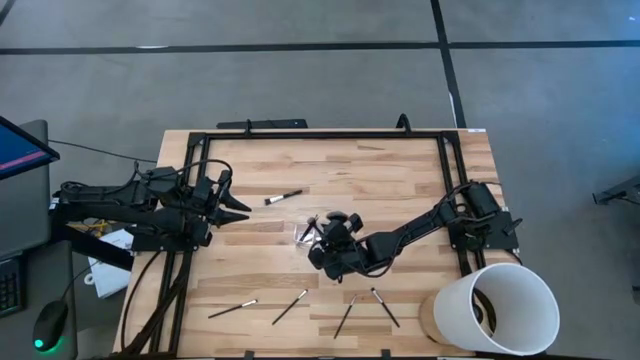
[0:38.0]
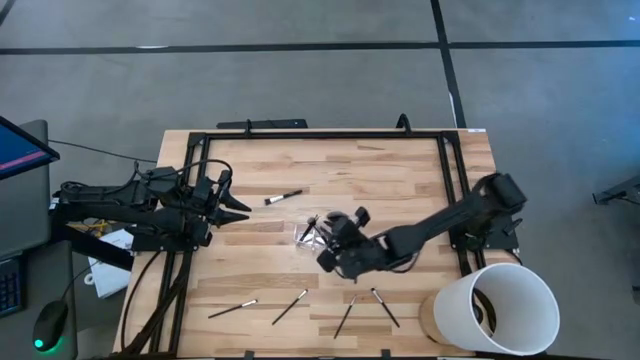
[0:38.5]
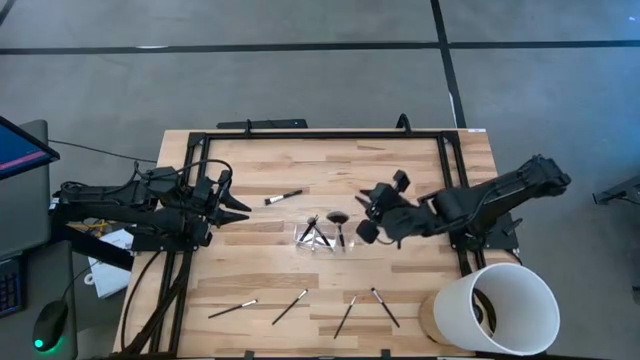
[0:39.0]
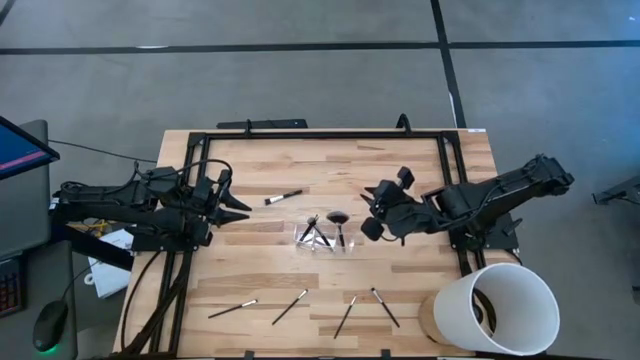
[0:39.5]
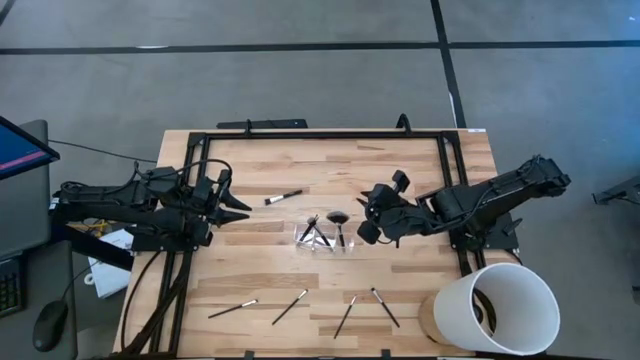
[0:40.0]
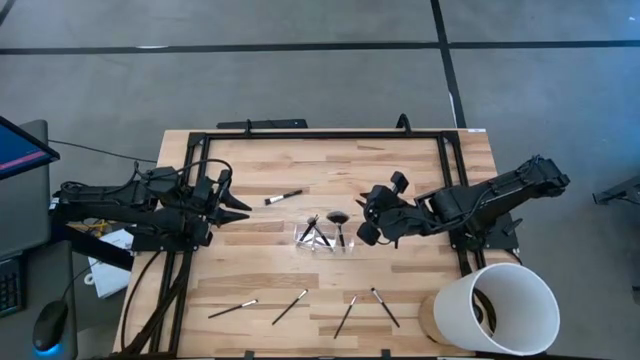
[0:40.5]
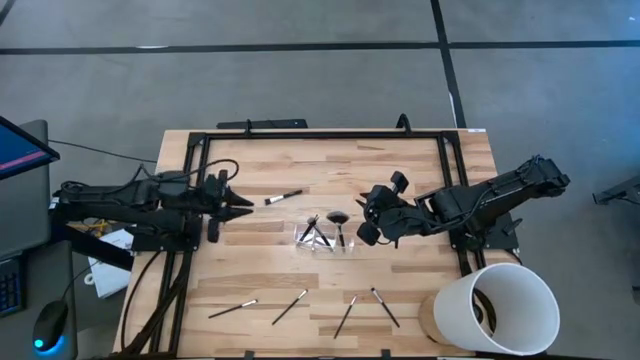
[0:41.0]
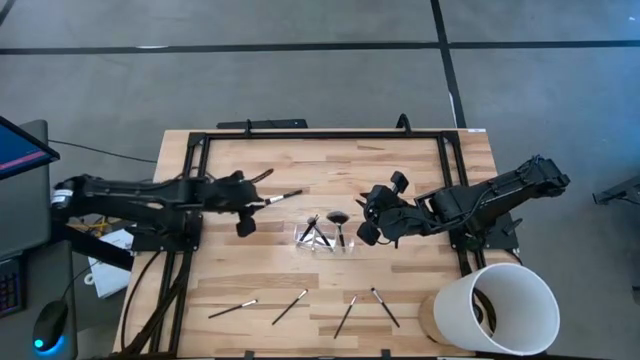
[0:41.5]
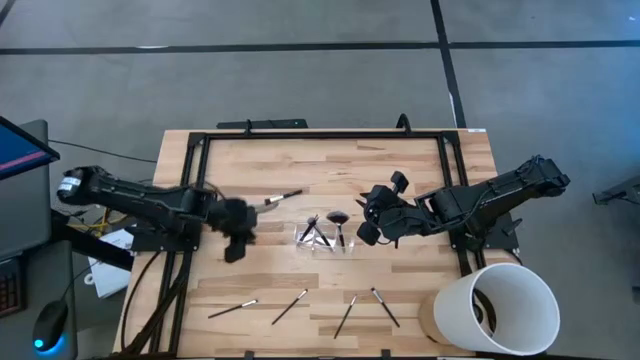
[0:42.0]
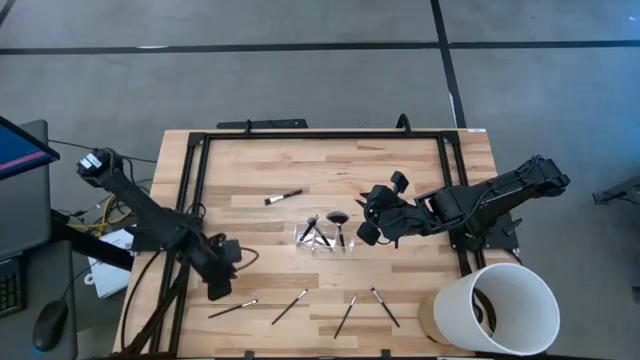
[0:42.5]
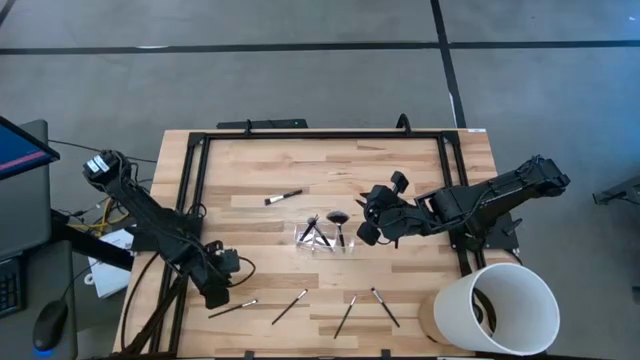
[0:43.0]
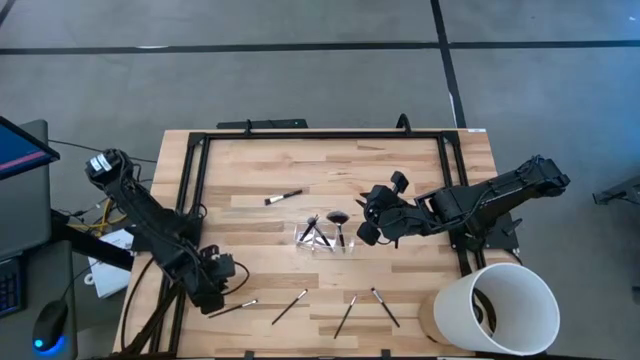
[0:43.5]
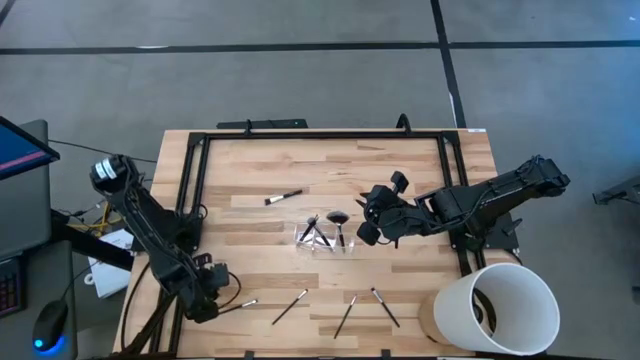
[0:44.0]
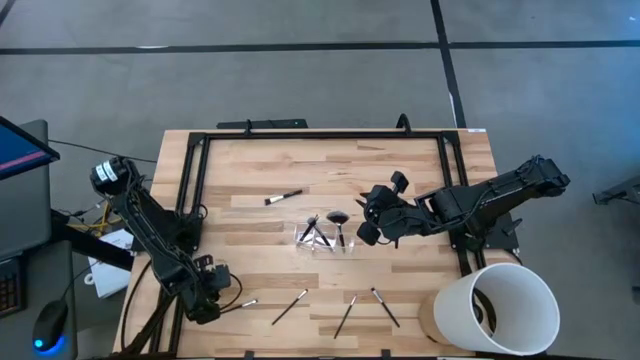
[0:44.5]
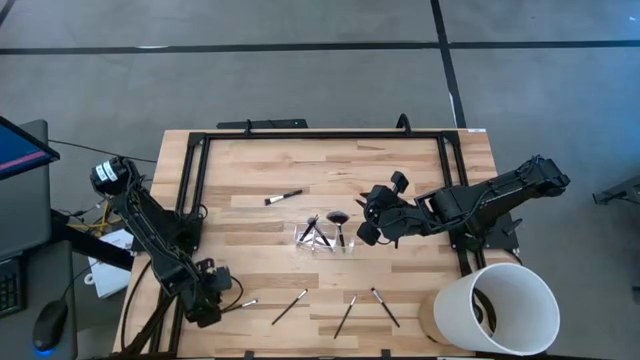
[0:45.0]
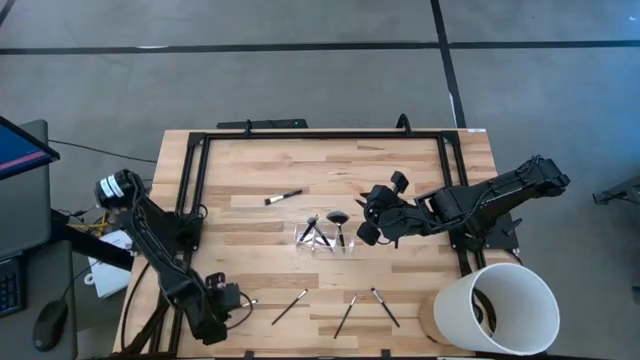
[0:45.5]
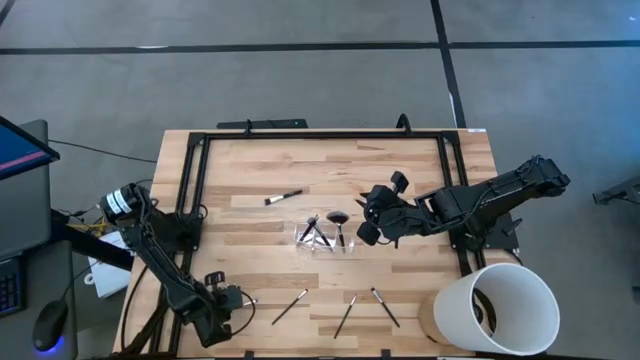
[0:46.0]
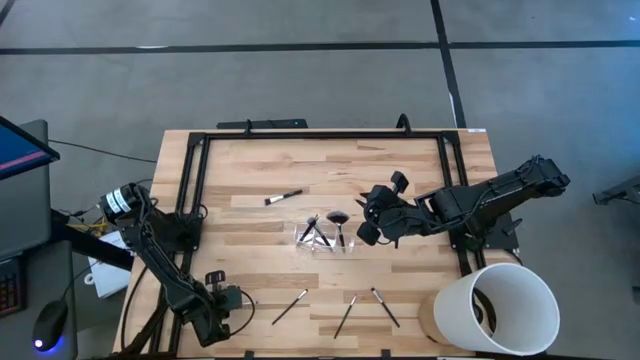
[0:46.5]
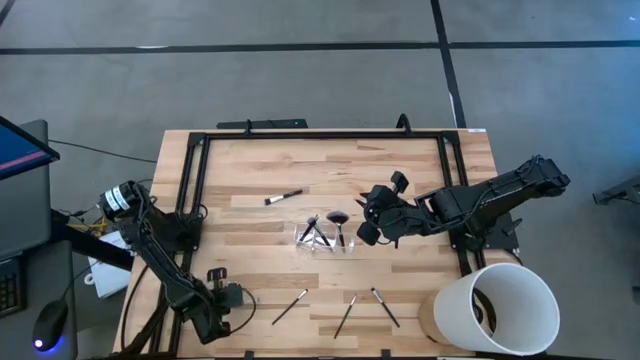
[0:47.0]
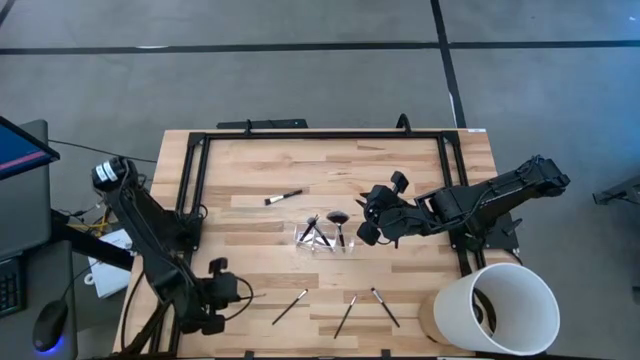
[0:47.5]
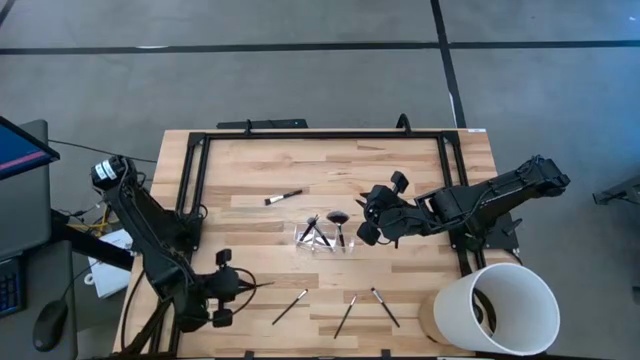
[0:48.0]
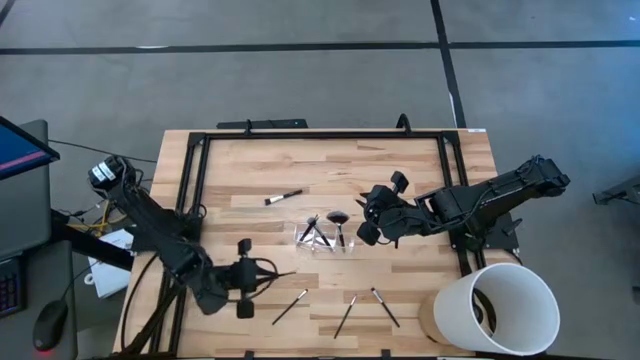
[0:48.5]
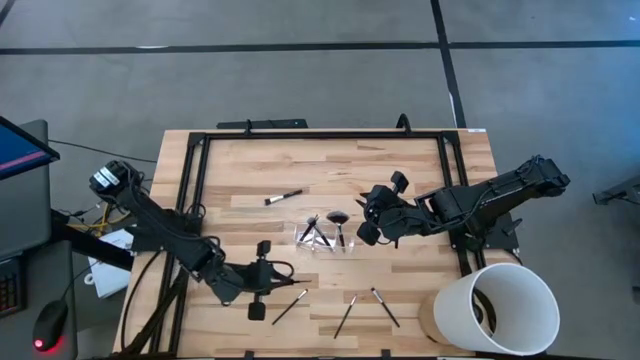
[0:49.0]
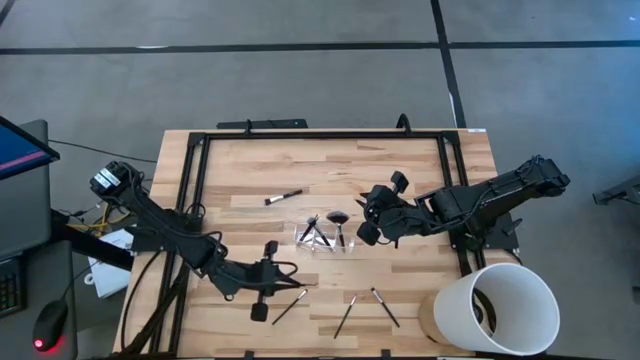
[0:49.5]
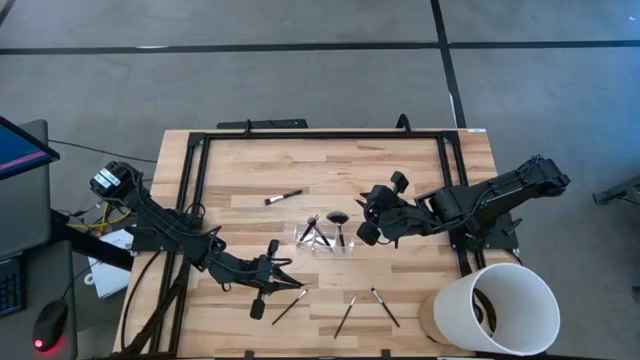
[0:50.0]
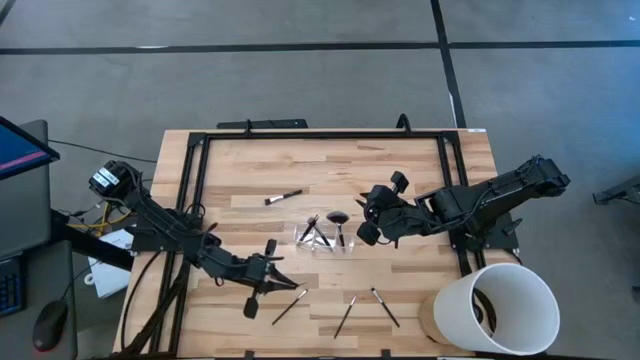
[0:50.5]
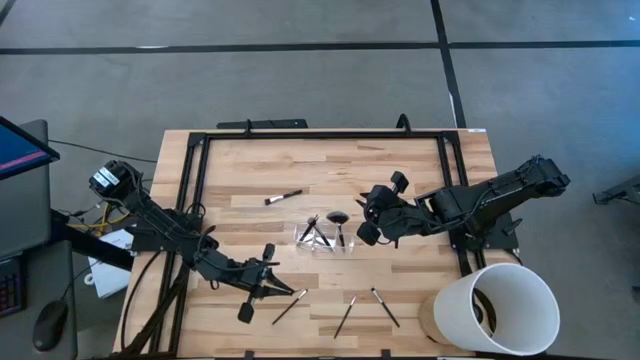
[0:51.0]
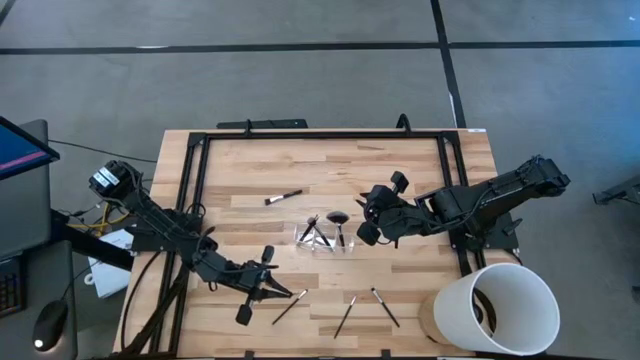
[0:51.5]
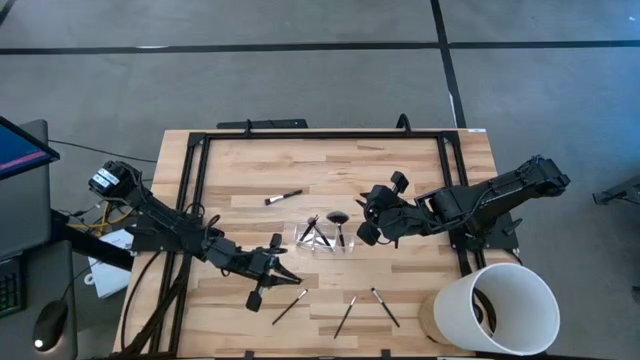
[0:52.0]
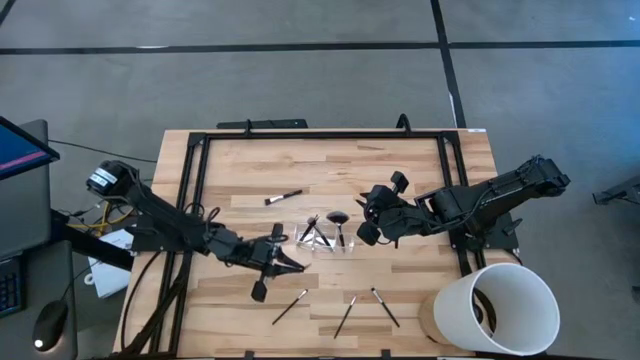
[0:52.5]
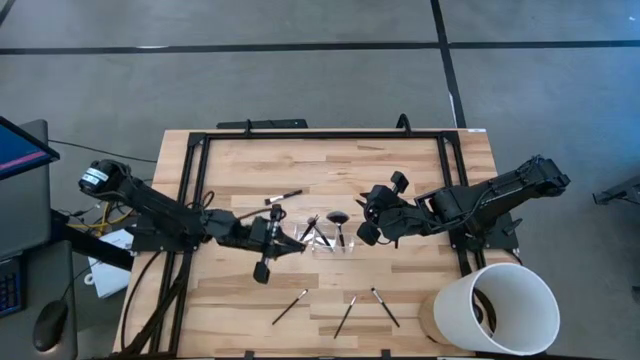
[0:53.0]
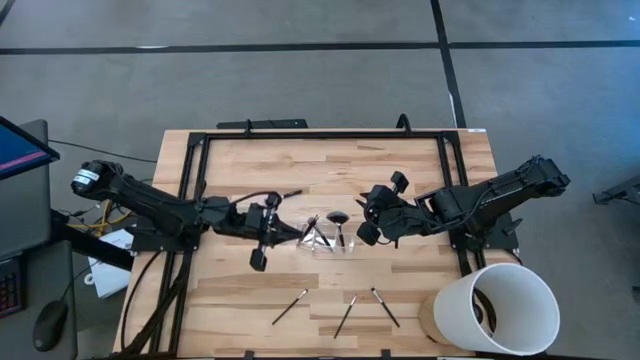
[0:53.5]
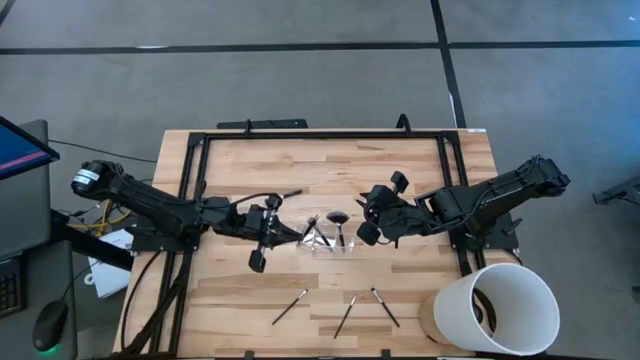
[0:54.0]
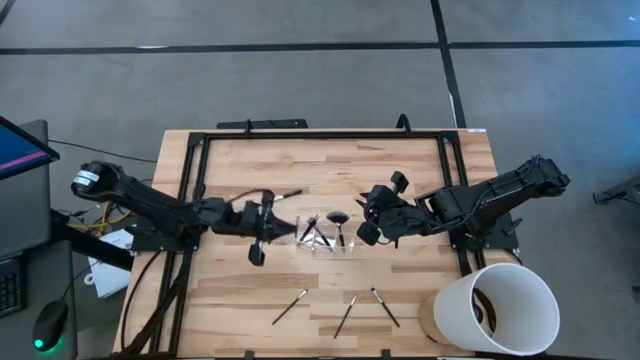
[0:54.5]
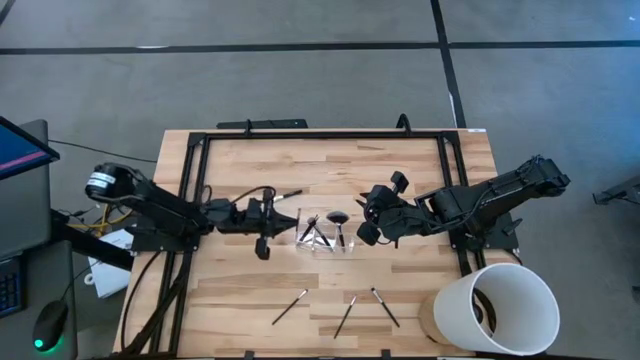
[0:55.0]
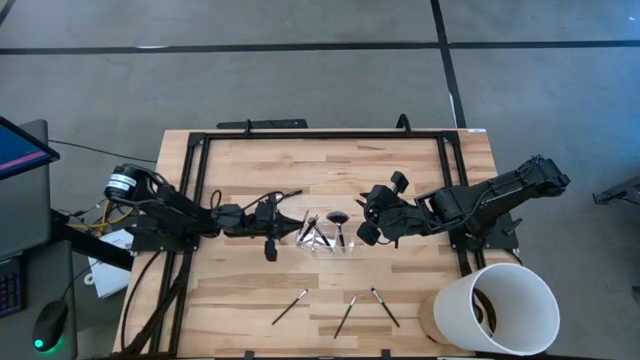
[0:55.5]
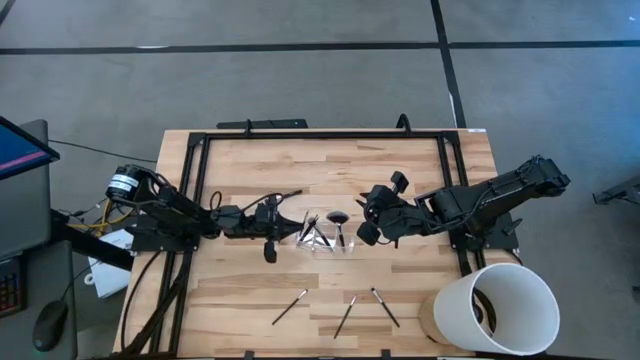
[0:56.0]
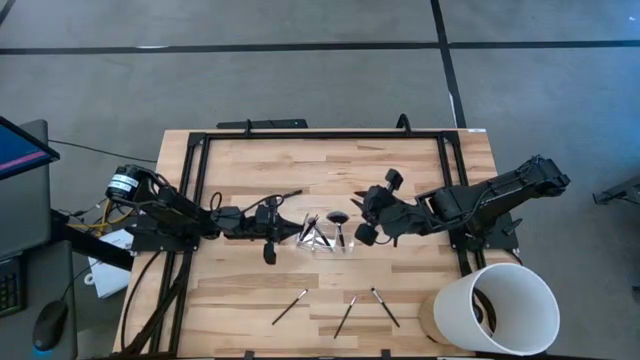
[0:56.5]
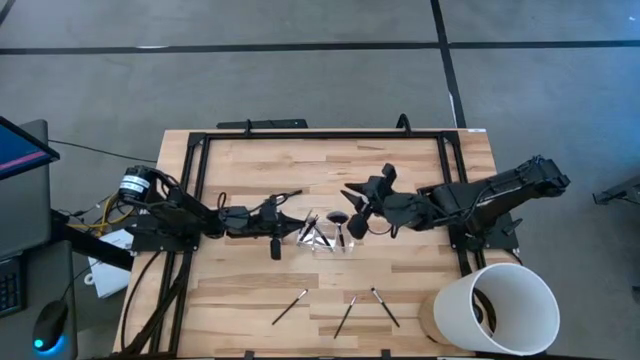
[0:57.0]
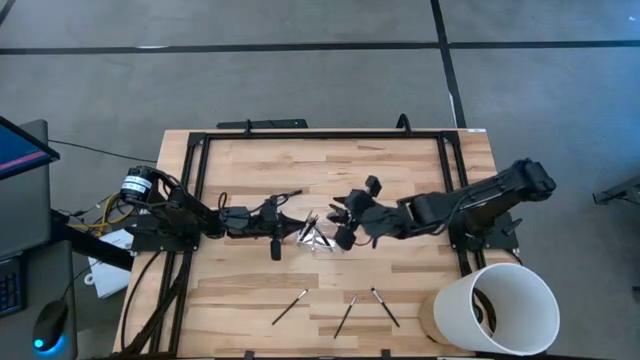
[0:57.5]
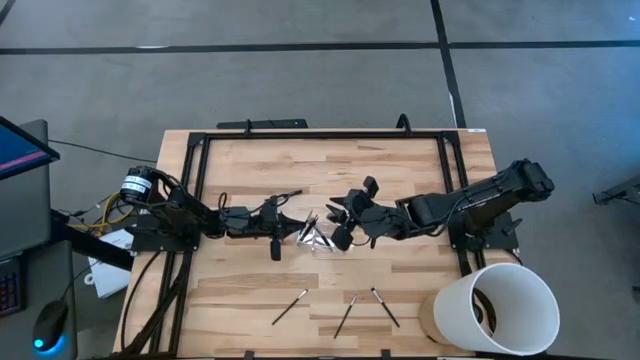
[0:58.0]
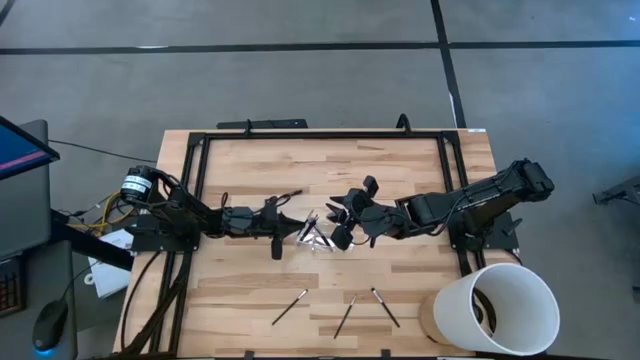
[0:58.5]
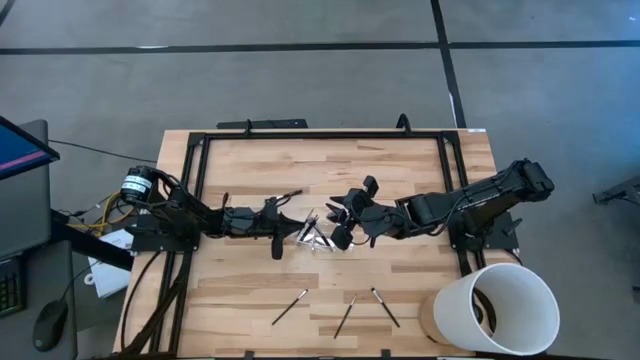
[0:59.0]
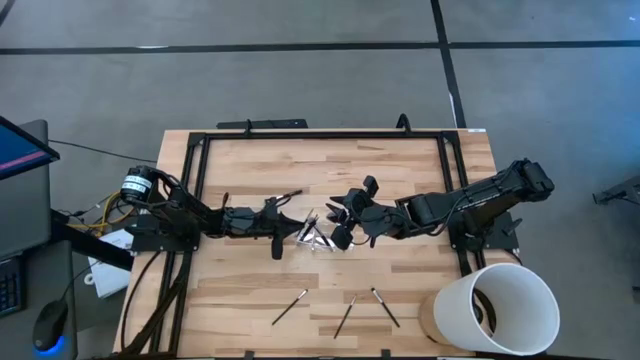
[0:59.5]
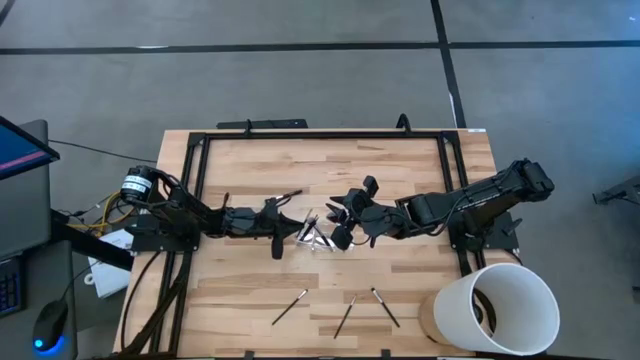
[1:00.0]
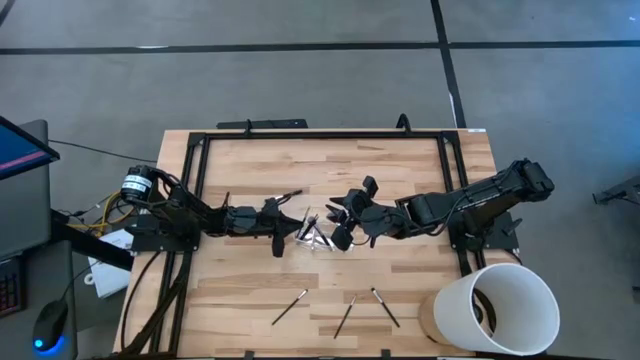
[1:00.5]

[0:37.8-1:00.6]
Task: Put items in baskets/containers
Put the eyeshadow brush into the left section of the transparent organizer
